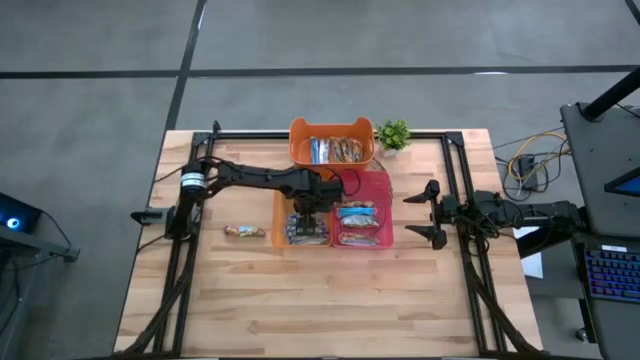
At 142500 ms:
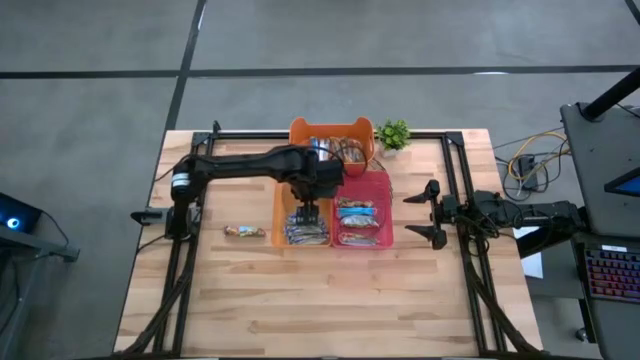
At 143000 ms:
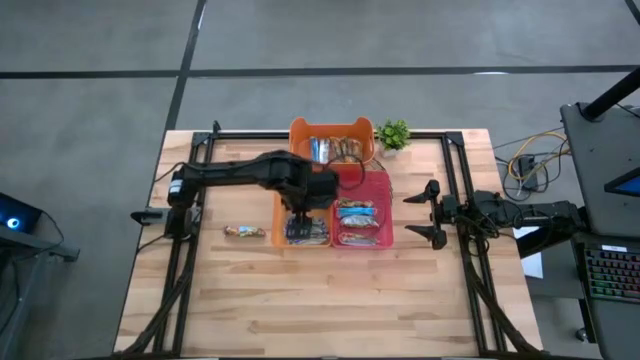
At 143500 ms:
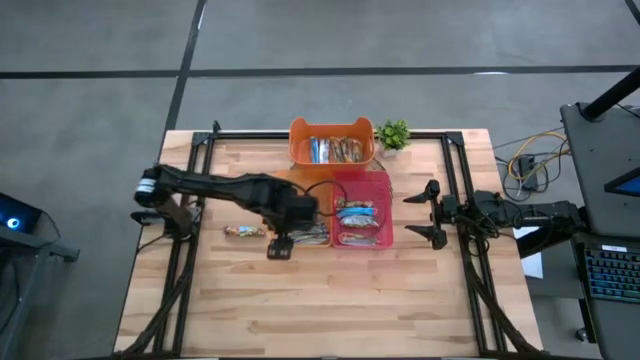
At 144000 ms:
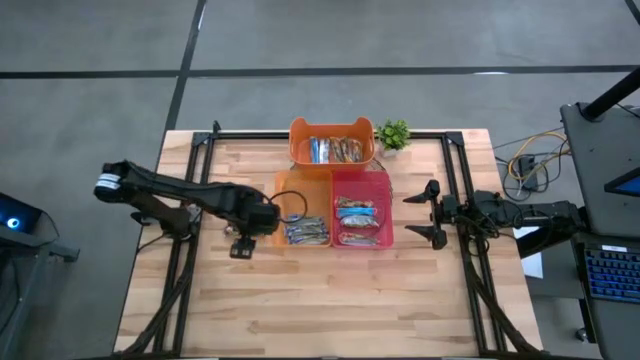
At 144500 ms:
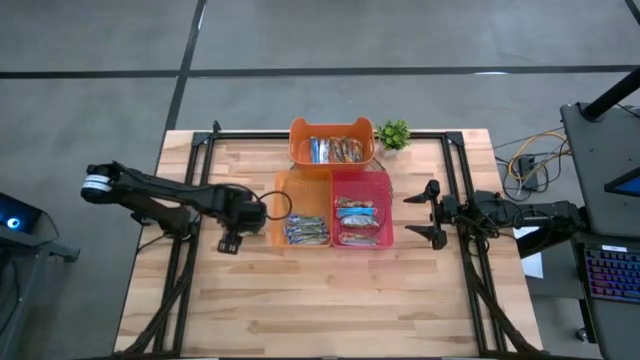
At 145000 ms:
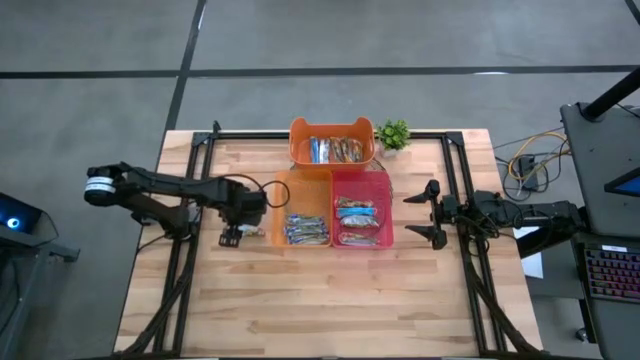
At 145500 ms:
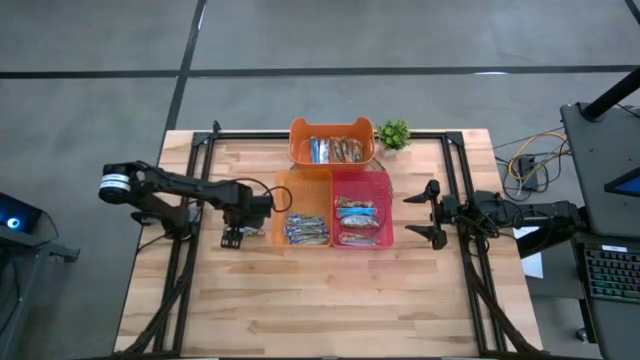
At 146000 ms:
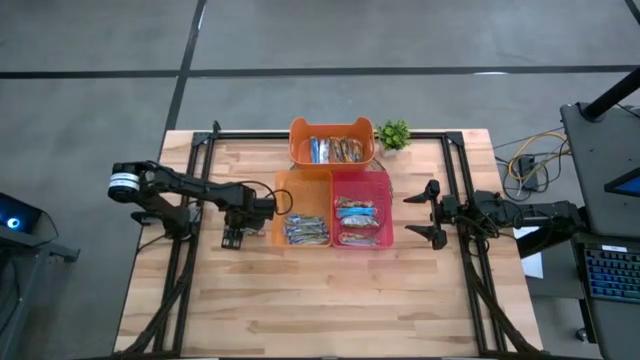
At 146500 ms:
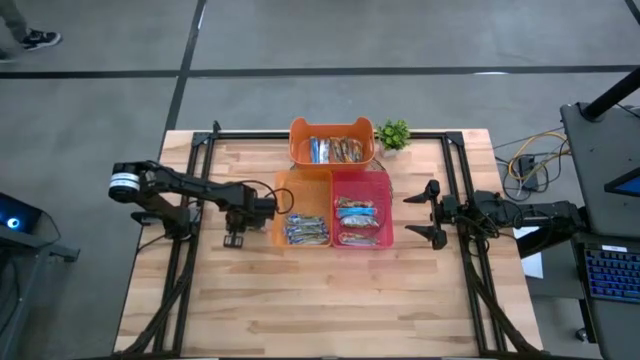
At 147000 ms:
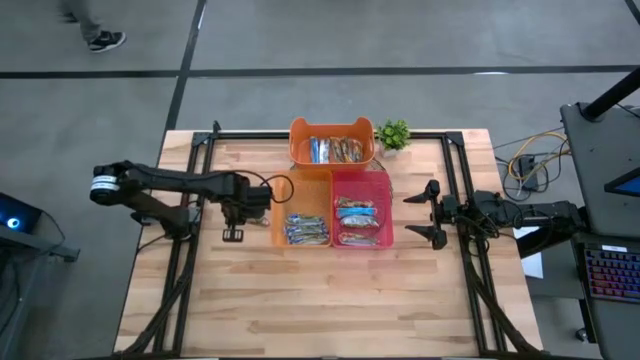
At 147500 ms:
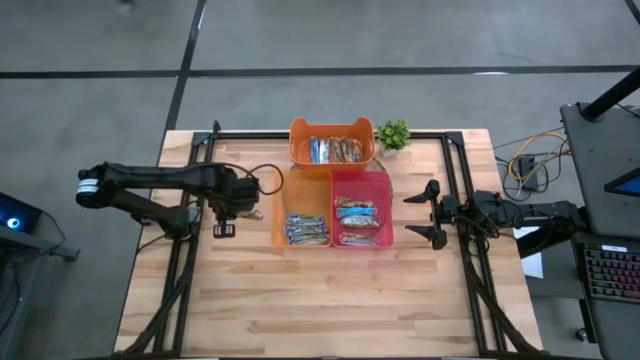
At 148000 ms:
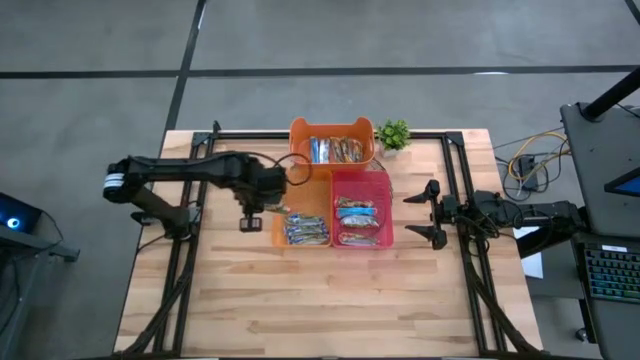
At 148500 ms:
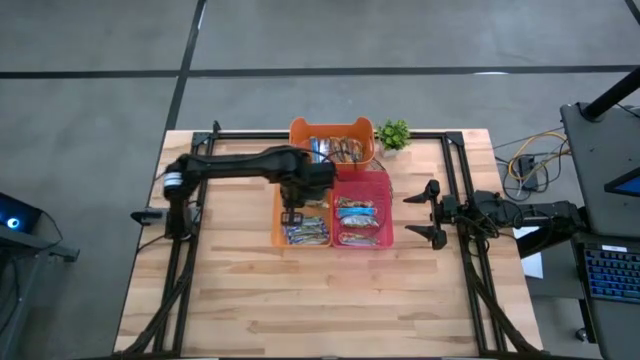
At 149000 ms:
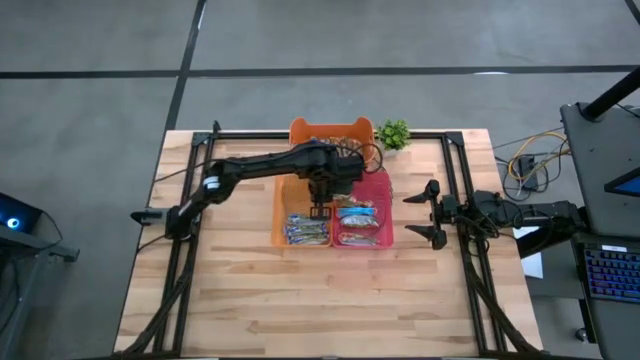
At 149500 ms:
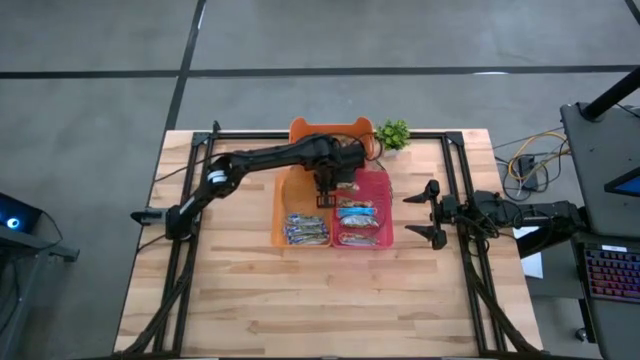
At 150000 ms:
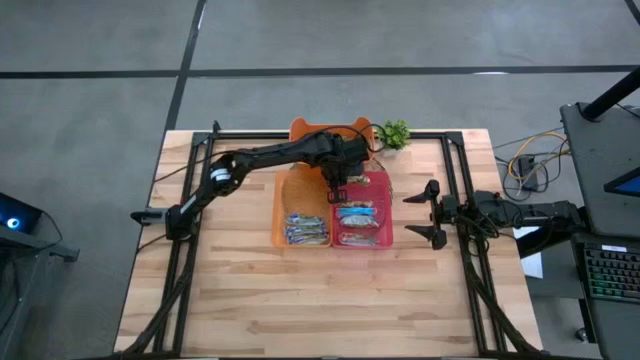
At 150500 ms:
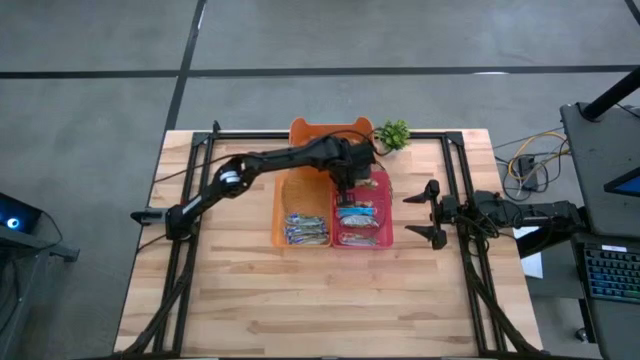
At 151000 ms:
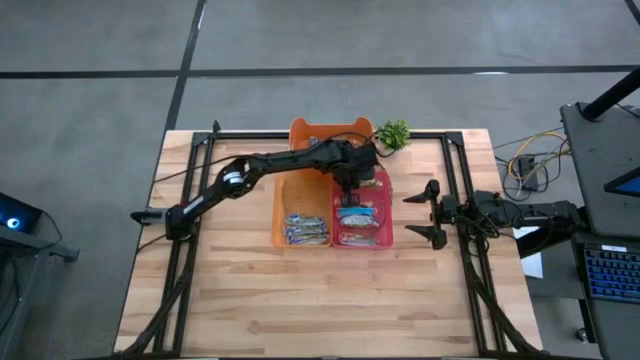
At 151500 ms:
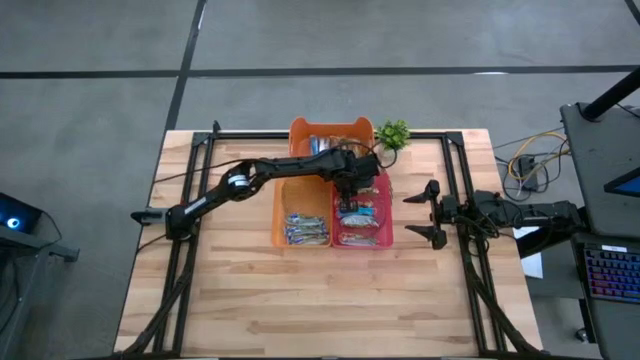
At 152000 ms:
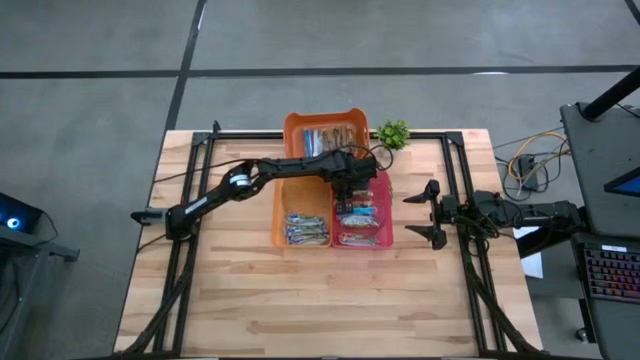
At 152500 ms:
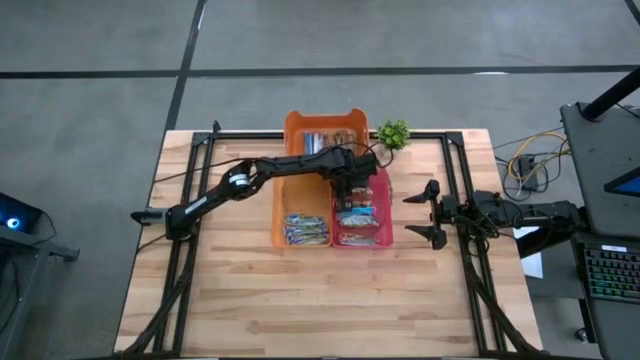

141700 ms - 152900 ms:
Task: Pick and place Granola Bars by type
Put the red granola bar into the pink bin

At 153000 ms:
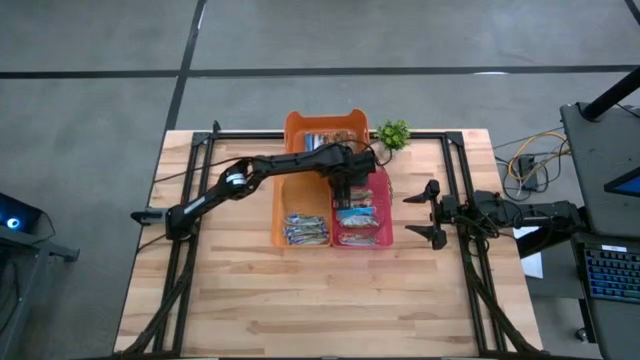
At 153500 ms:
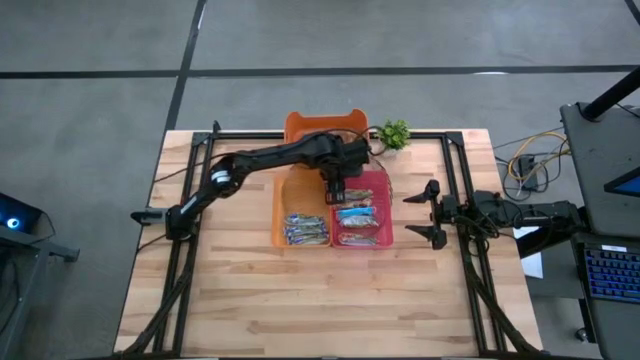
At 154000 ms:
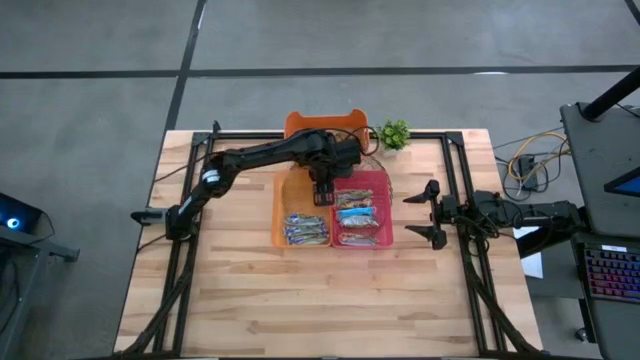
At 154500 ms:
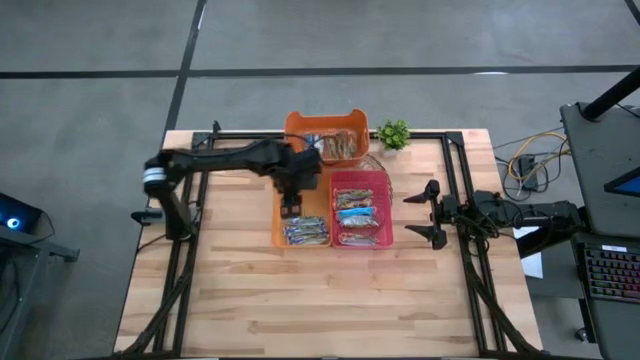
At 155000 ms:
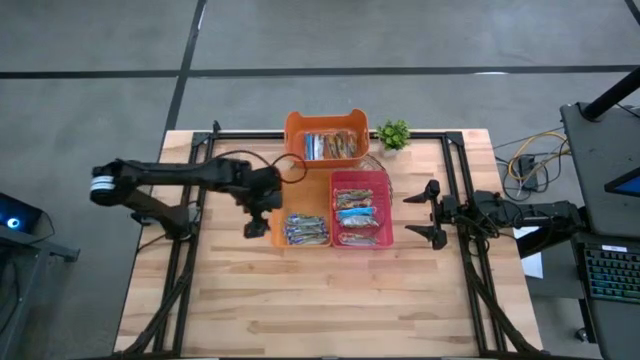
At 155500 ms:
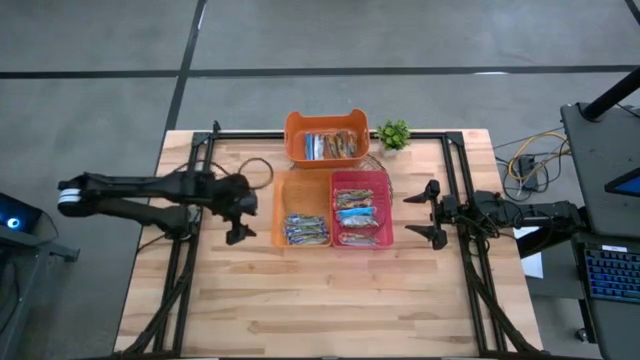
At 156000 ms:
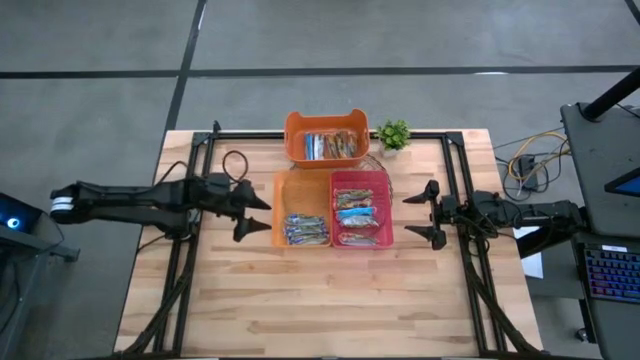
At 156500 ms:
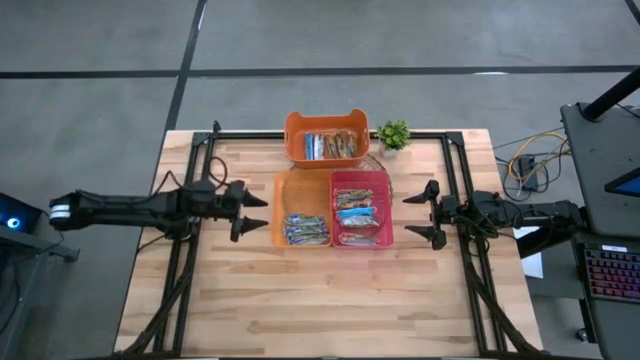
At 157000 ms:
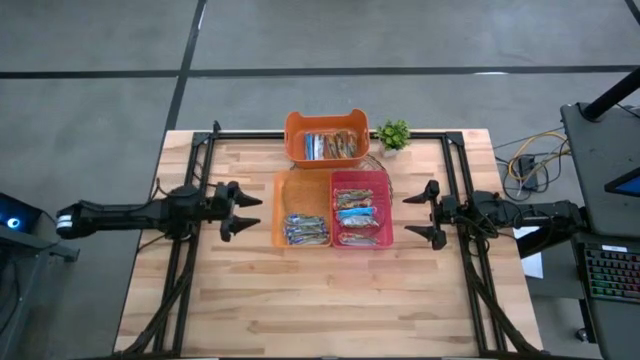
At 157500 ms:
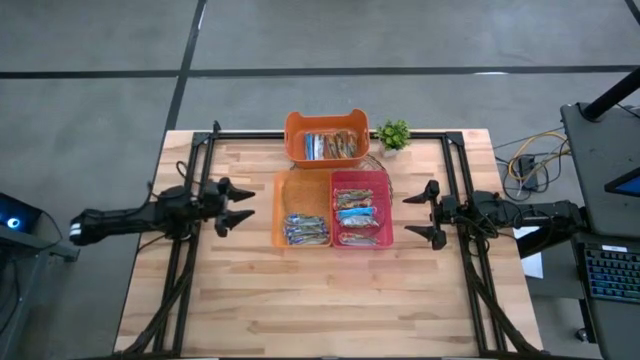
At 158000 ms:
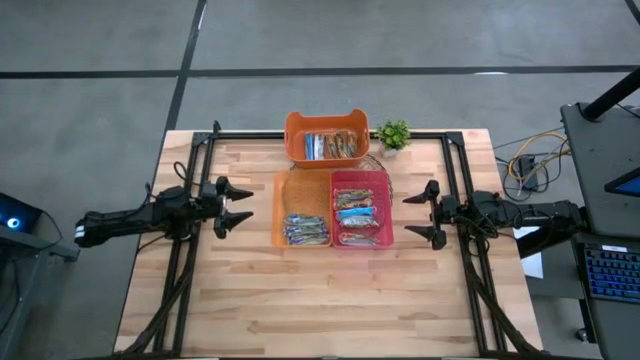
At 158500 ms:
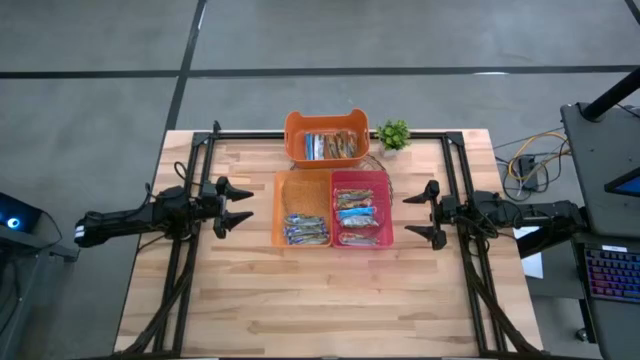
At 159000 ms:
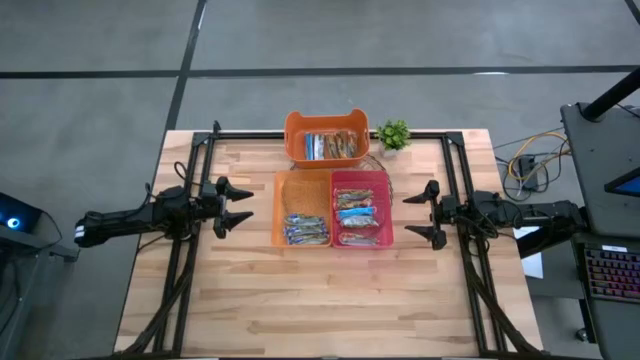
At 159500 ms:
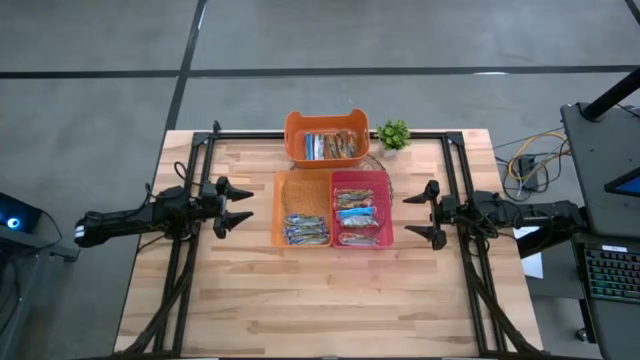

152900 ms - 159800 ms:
Return to Home Position

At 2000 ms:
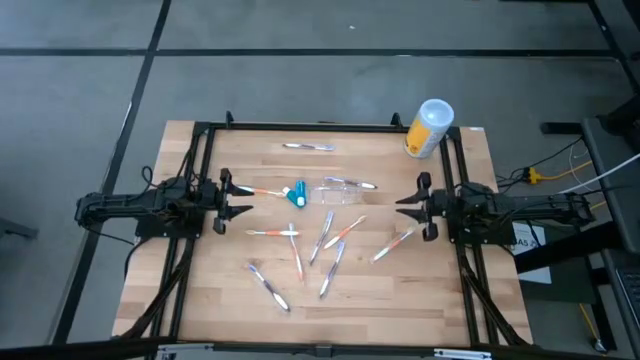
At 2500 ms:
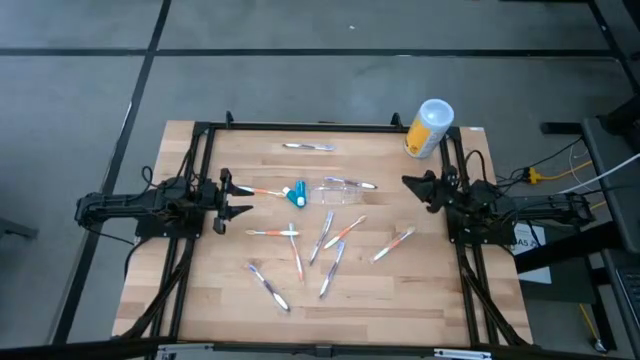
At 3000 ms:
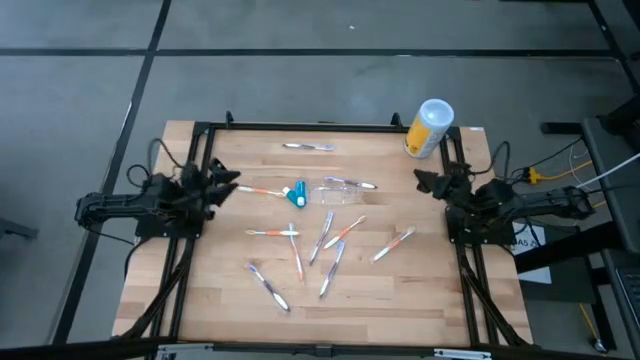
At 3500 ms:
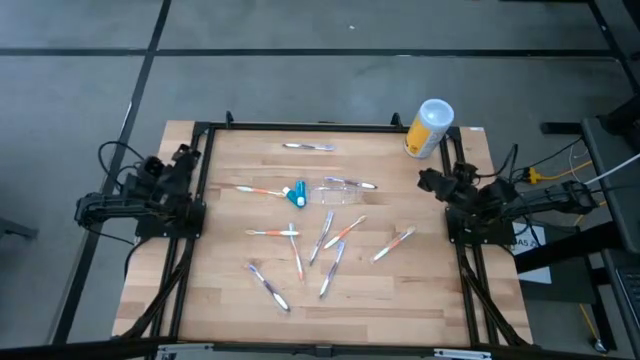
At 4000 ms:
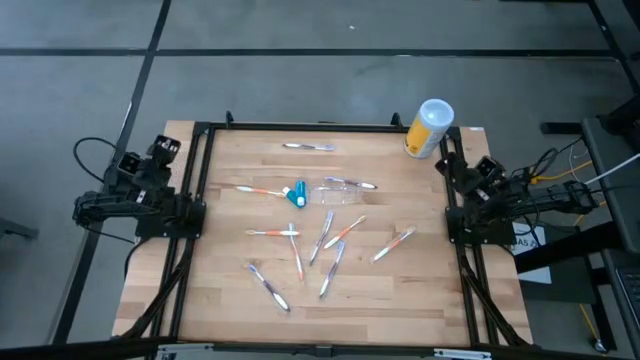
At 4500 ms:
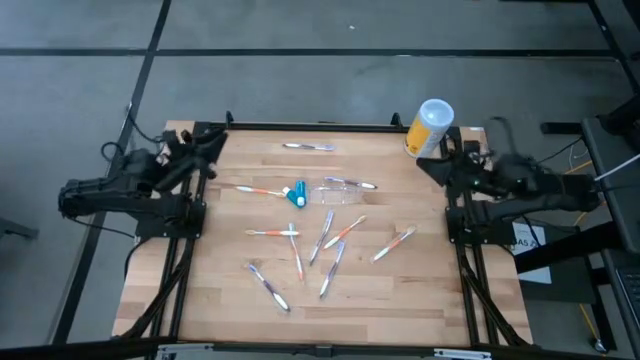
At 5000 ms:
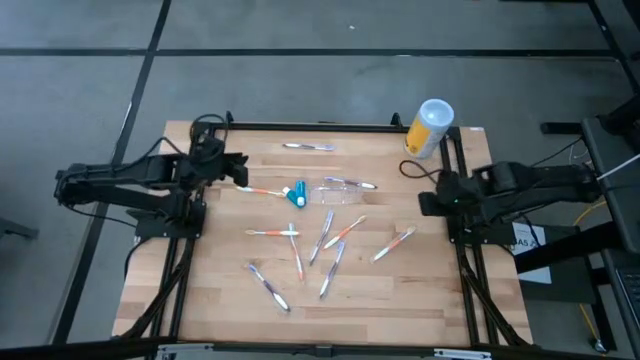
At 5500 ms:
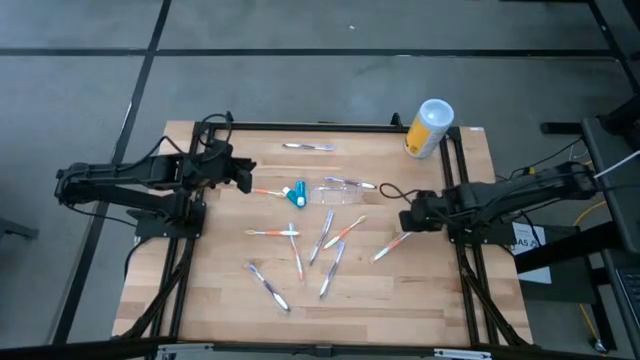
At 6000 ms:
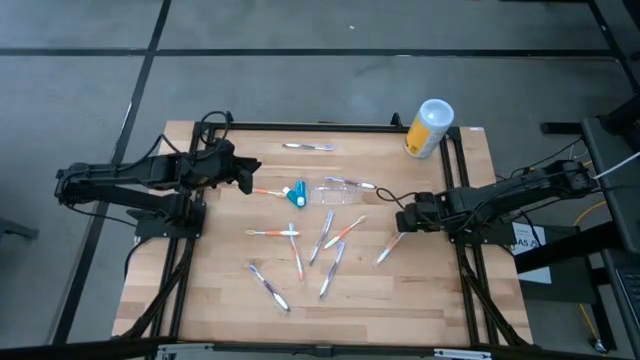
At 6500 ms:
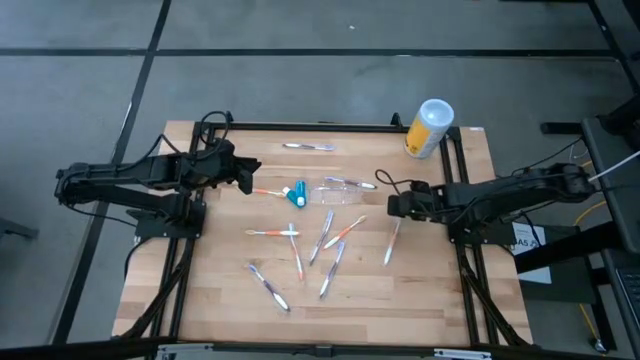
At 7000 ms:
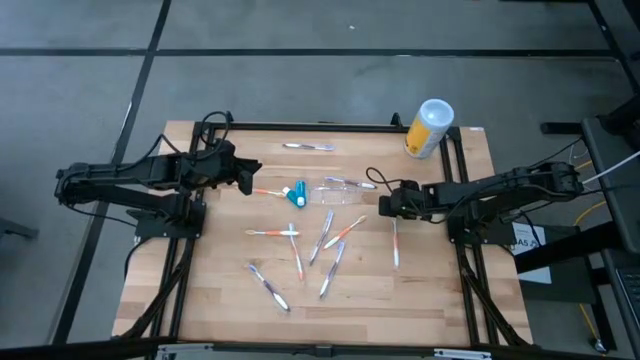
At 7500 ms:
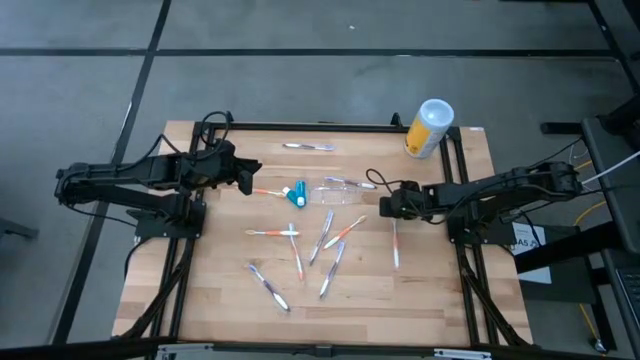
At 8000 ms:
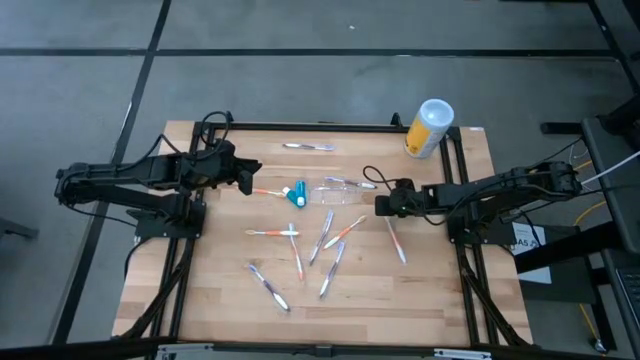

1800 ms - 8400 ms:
Task: Pick & Place toothbrushing station
Put the orange toothbrush into the right section of the transparent organizer
